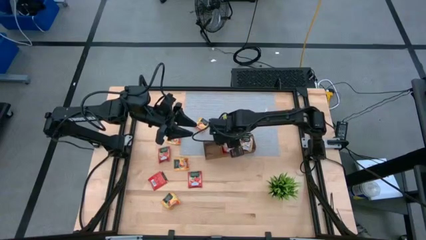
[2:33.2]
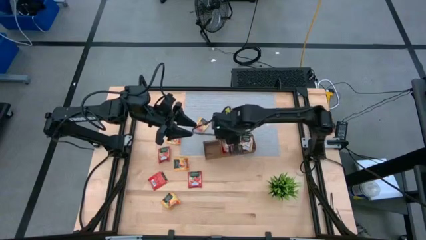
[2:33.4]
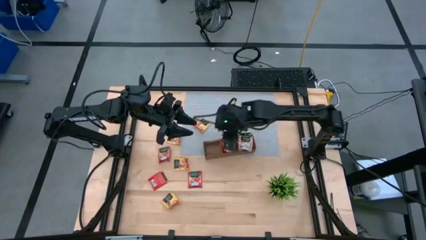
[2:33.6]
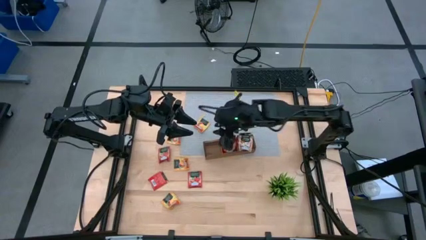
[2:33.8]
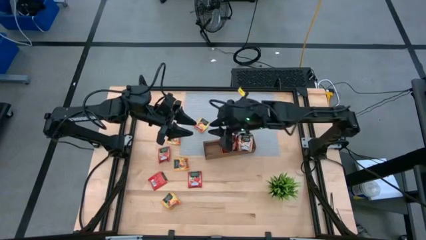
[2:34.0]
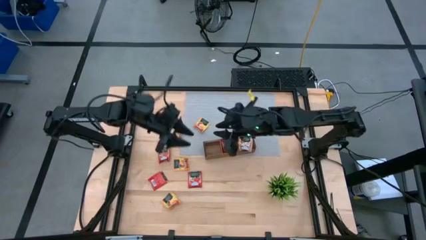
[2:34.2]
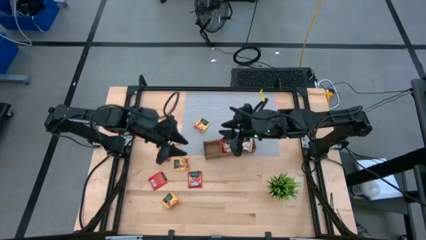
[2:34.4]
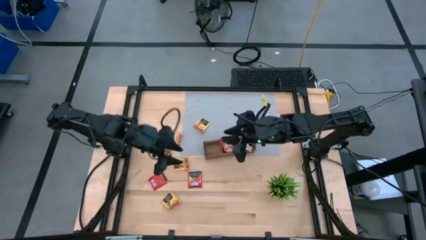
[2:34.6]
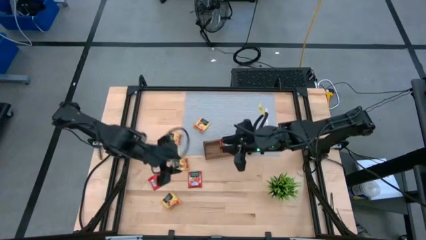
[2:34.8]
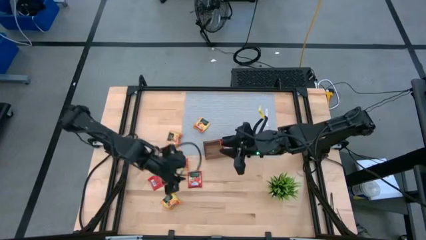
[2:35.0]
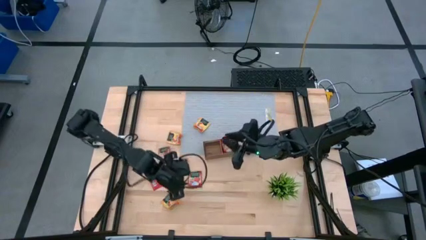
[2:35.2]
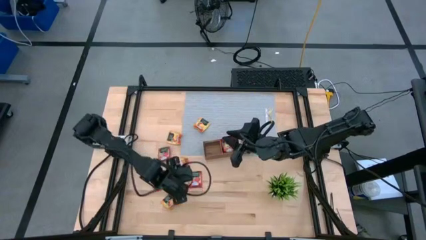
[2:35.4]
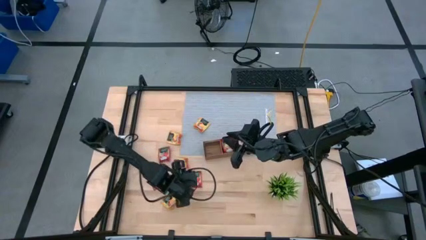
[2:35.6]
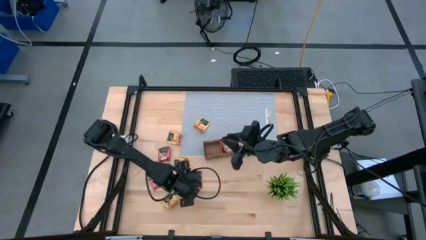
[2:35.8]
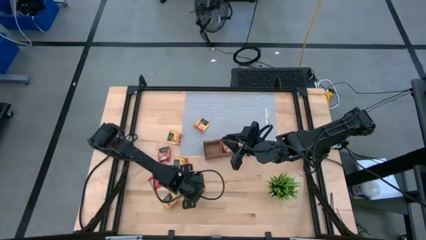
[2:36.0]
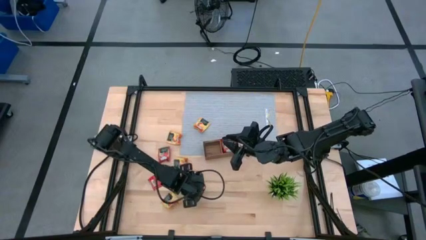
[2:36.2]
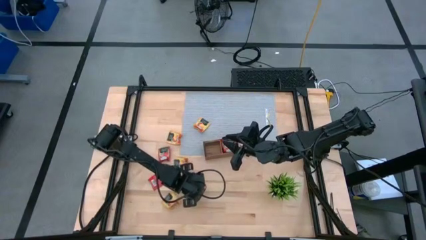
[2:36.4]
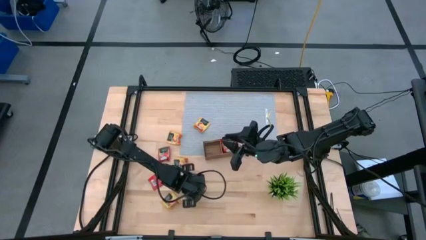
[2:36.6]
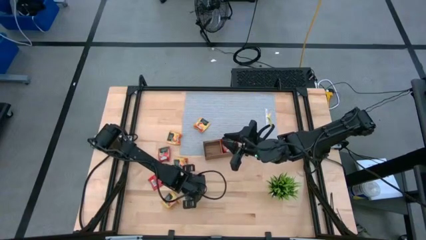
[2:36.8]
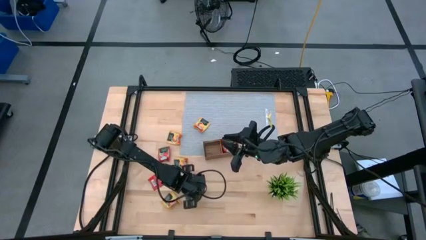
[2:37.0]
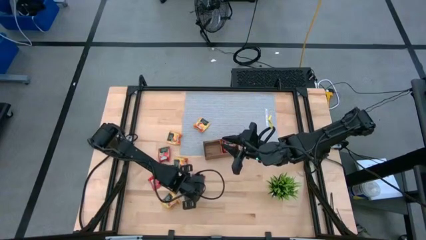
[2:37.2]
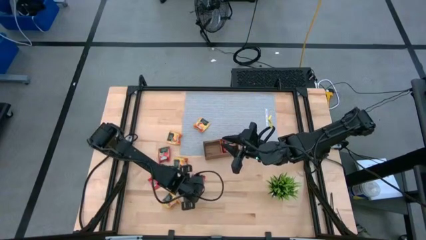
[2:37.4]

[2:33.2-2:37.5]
Task: Pick & Place Tea
Put the red tea bag into the middle section of the wooden organizer

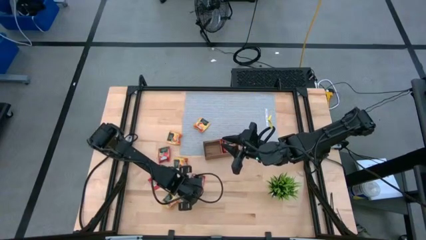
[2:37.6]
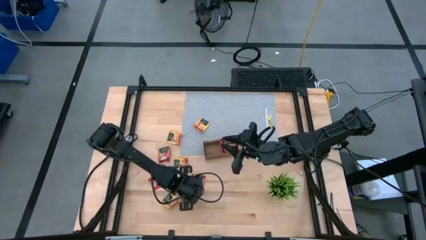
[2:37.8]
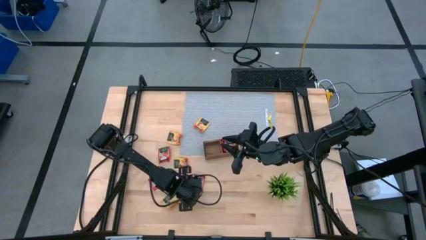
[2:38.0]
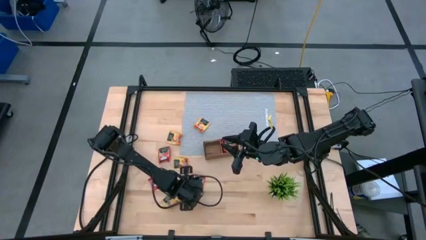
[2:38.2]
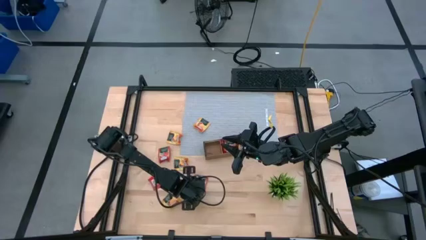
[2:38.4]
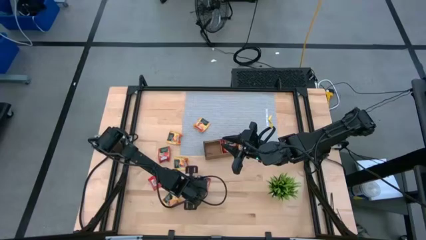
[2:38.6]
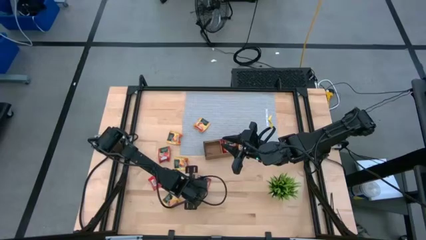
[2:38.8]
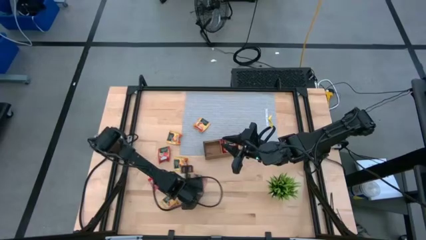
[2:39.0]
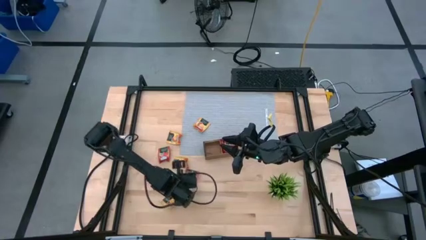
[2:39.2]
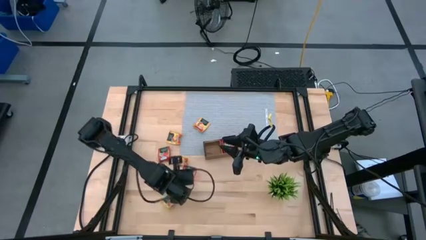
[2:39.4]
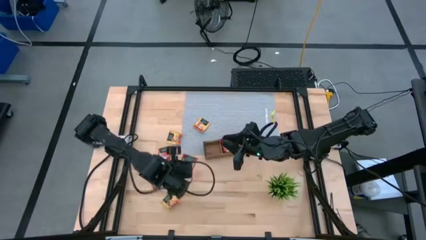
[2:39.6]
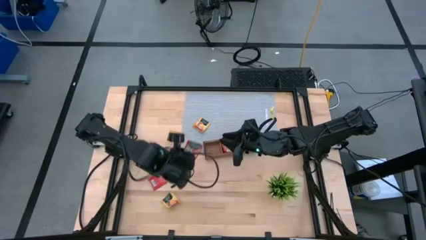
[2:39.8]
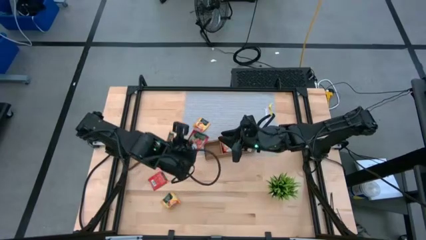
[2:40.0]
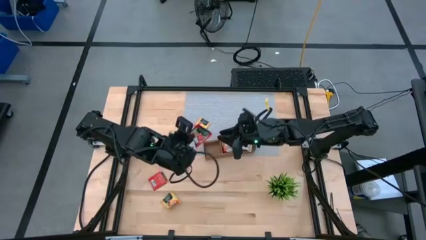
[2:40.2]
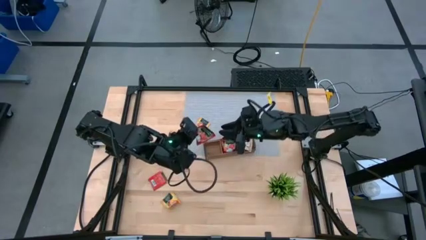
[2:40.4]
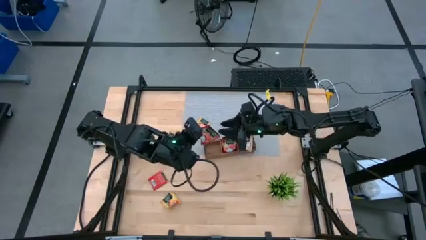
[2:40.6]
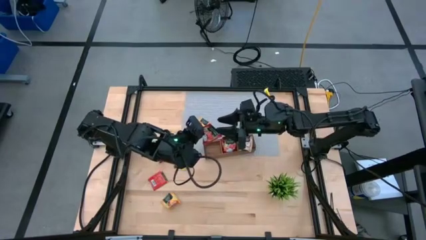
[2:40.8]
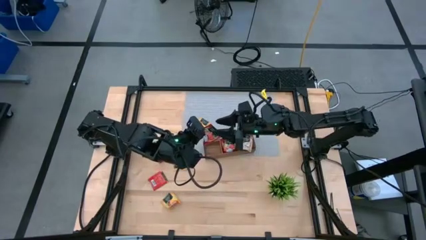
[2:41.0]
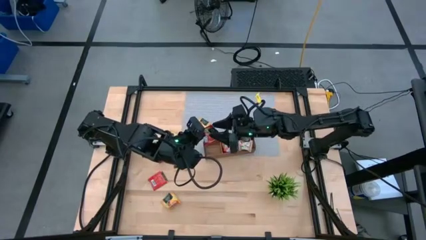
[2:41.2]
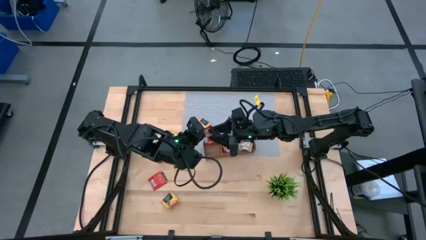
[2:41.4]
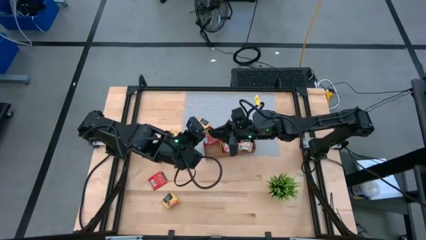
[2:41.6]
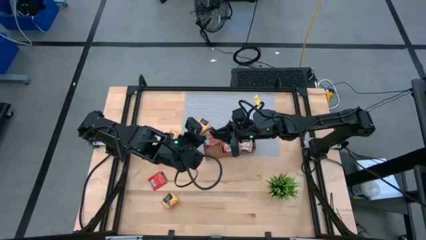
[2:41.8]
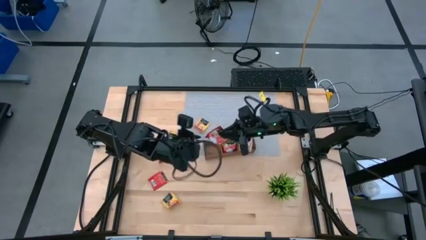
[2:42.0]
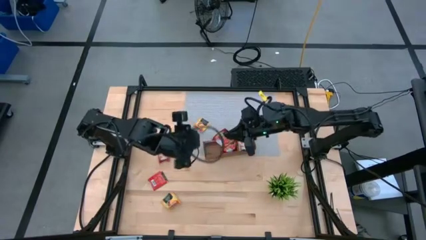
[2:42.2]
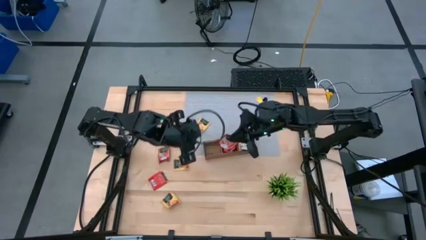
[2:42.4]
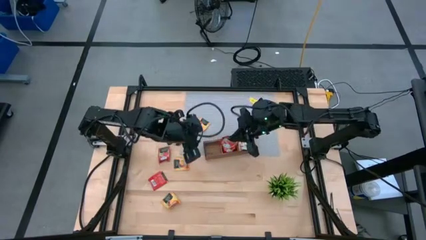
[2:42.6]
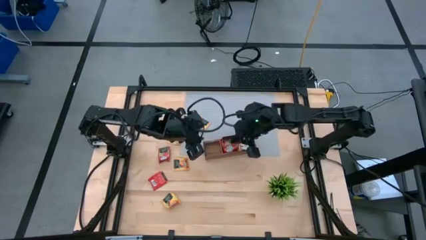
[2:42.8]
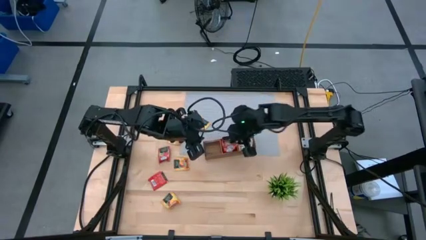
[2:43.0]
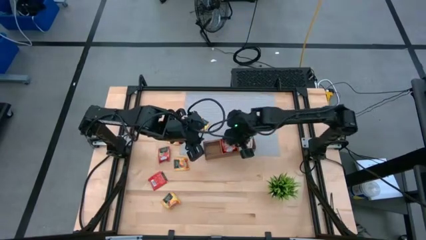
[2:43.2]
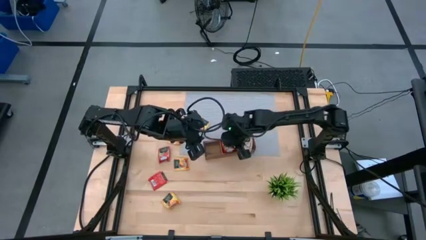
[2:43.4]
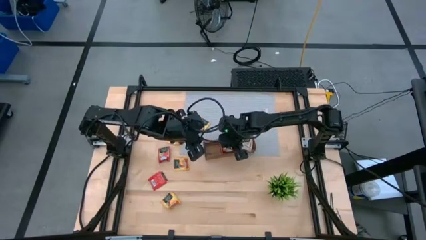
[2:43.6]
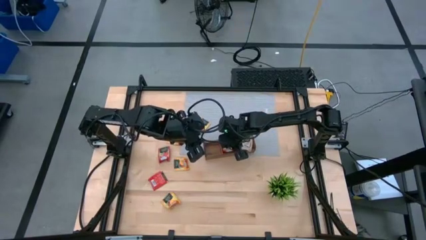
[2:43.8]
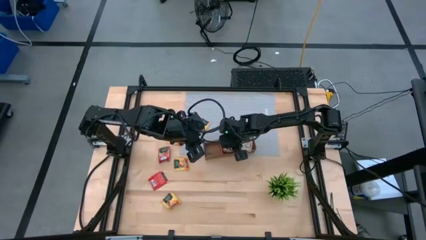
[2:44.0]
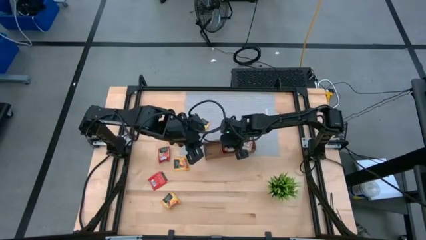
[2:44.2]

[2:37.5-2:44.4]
Put the red tea bag into the middle section of the wooden organizer
